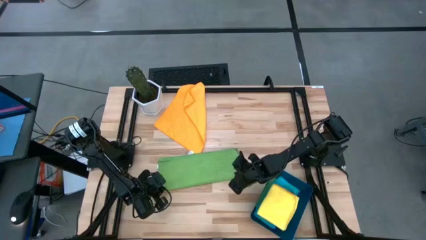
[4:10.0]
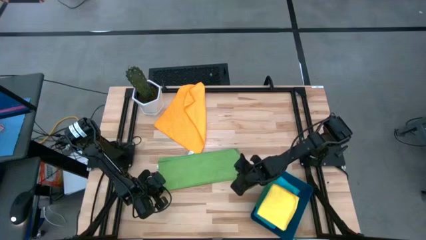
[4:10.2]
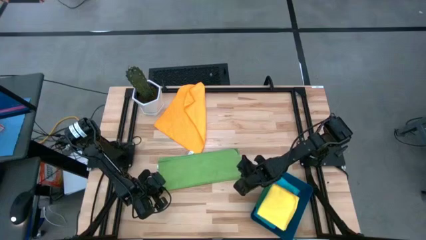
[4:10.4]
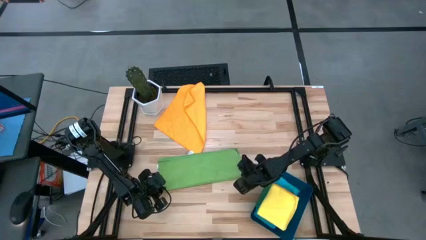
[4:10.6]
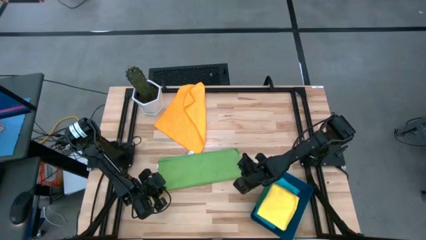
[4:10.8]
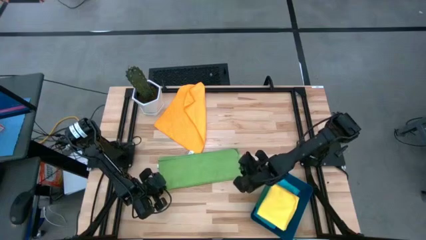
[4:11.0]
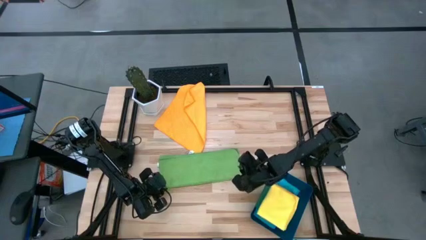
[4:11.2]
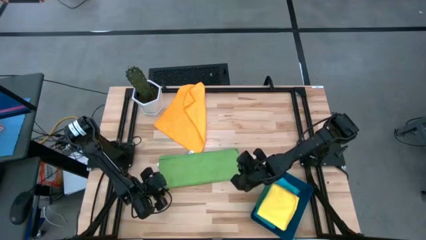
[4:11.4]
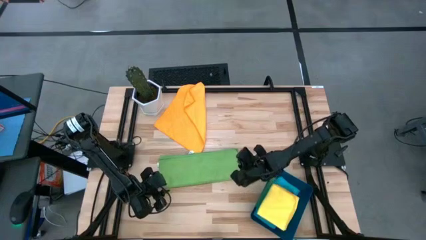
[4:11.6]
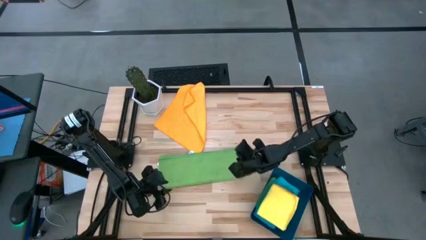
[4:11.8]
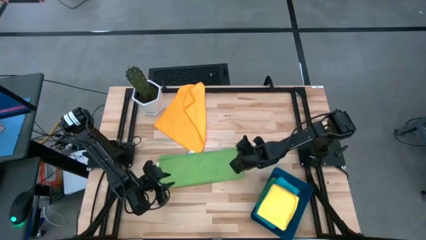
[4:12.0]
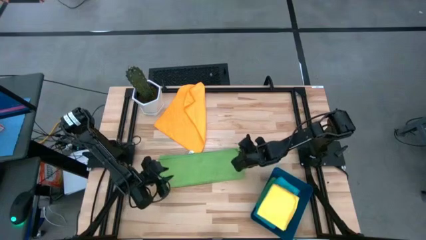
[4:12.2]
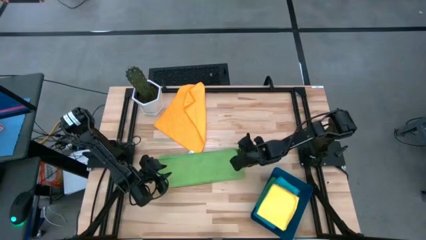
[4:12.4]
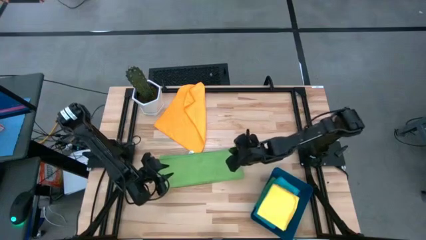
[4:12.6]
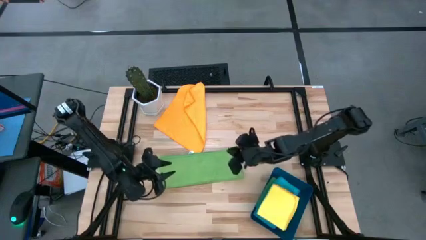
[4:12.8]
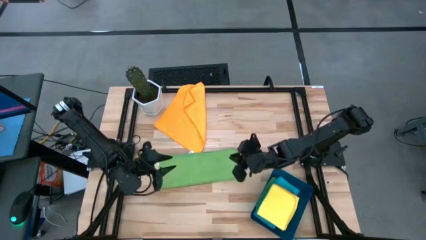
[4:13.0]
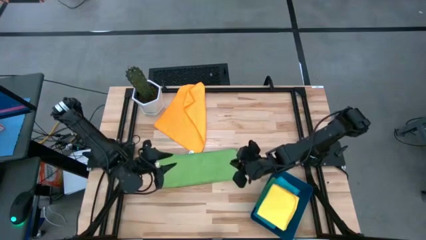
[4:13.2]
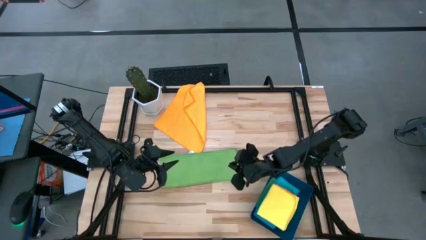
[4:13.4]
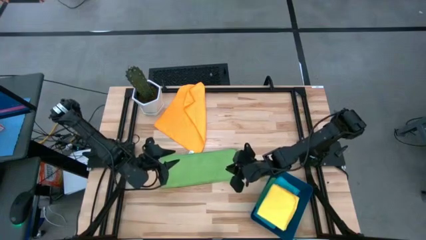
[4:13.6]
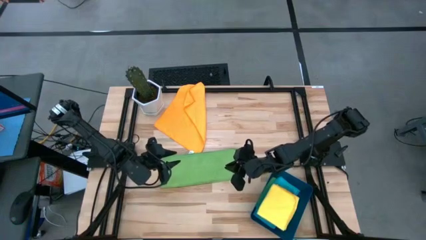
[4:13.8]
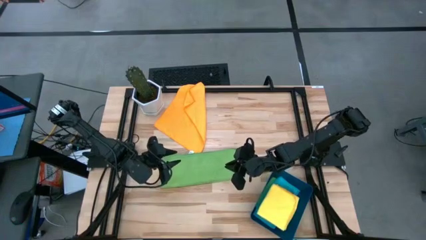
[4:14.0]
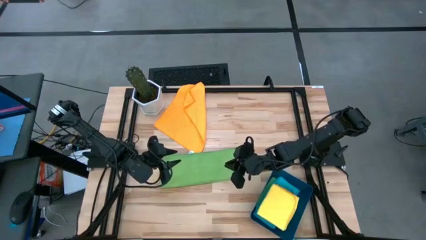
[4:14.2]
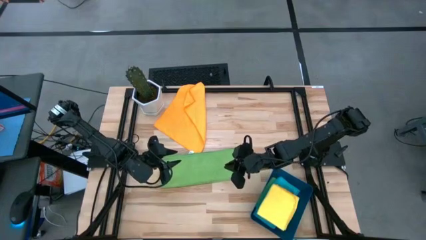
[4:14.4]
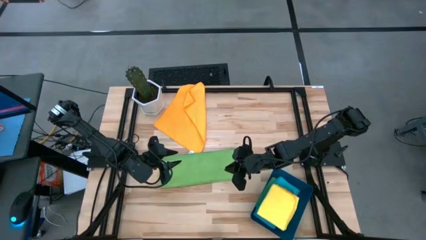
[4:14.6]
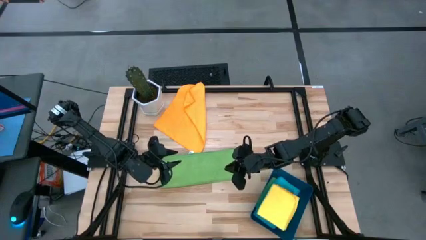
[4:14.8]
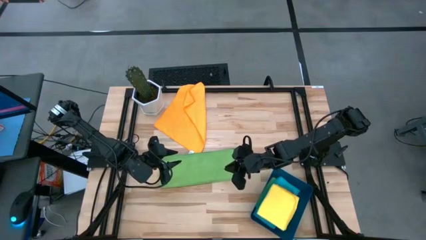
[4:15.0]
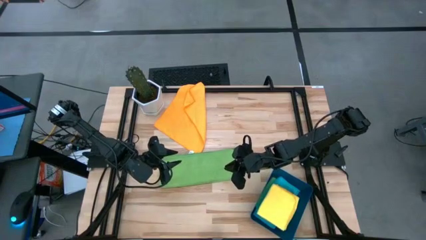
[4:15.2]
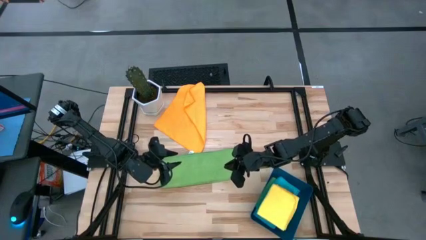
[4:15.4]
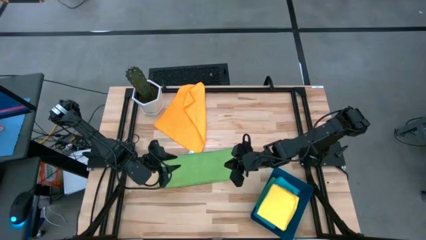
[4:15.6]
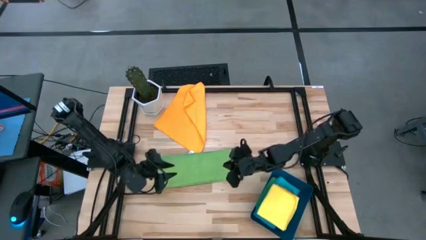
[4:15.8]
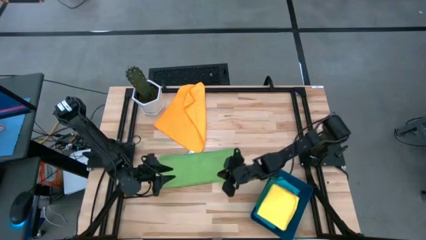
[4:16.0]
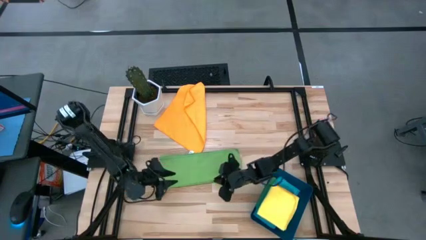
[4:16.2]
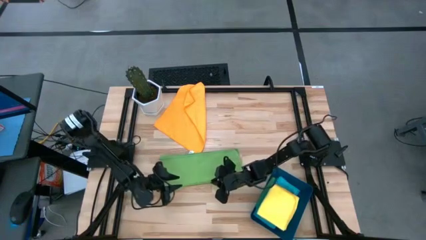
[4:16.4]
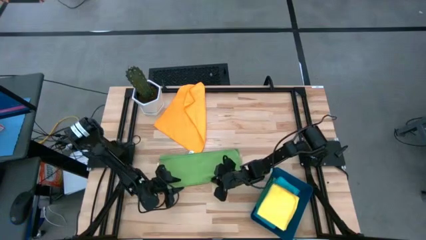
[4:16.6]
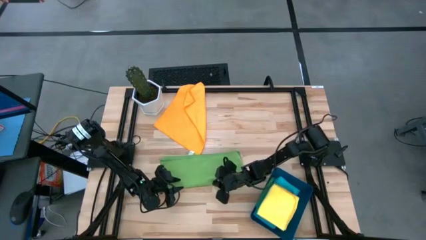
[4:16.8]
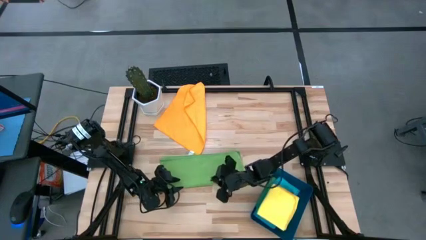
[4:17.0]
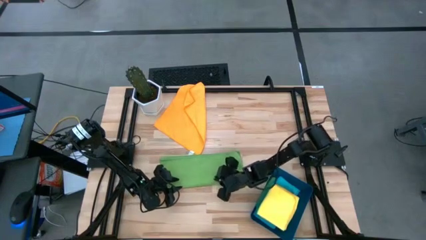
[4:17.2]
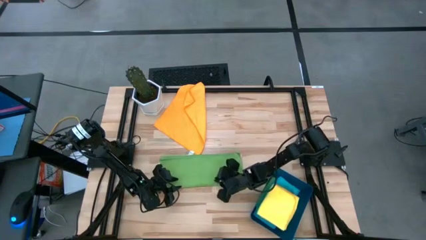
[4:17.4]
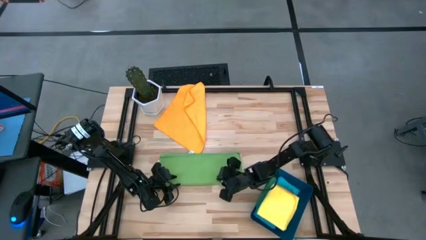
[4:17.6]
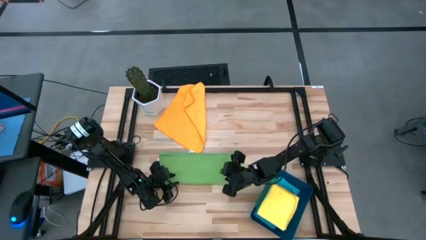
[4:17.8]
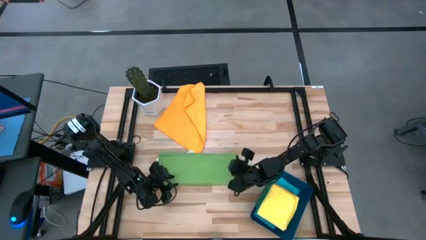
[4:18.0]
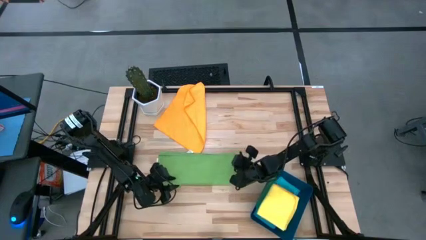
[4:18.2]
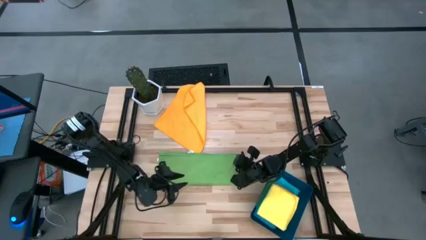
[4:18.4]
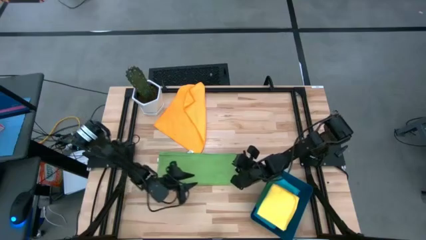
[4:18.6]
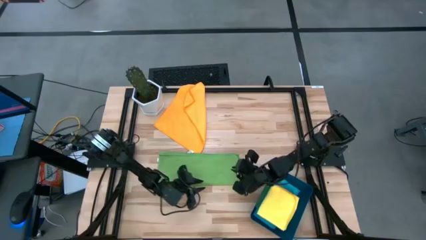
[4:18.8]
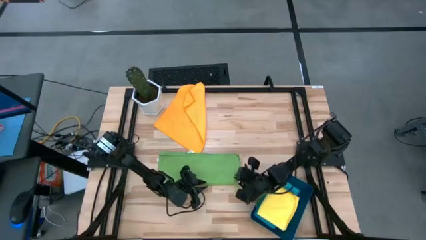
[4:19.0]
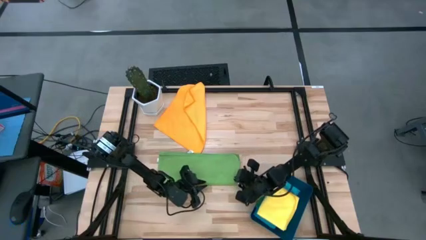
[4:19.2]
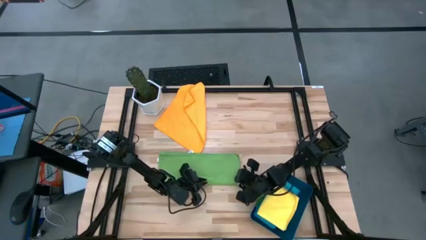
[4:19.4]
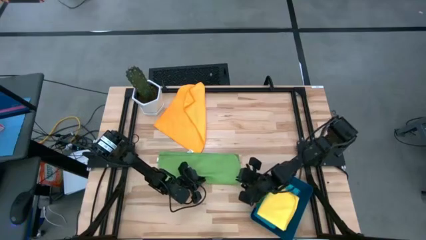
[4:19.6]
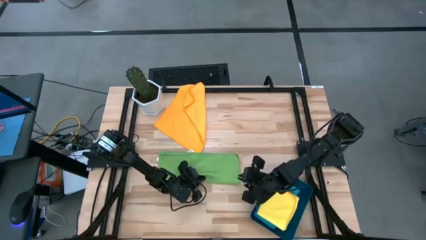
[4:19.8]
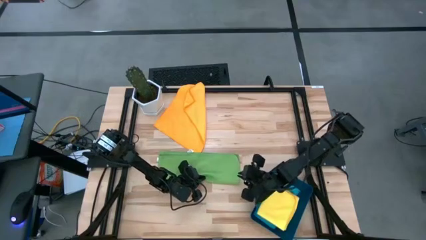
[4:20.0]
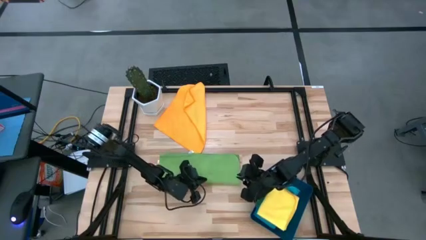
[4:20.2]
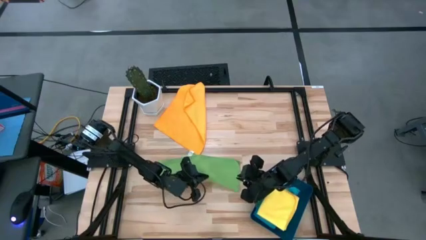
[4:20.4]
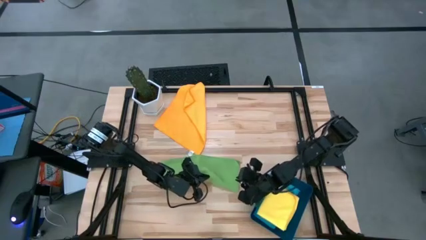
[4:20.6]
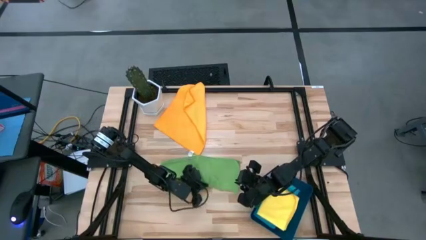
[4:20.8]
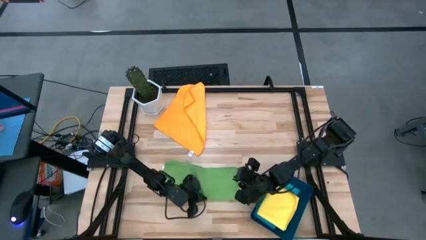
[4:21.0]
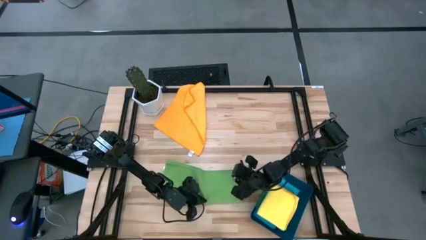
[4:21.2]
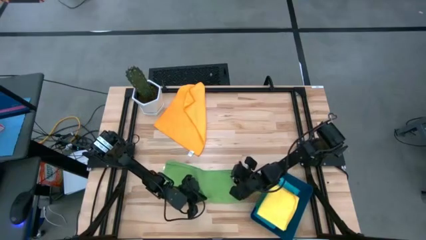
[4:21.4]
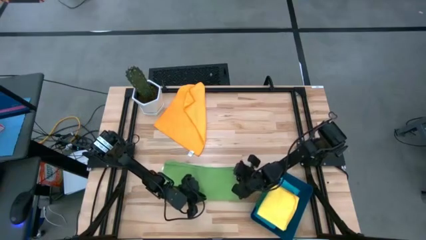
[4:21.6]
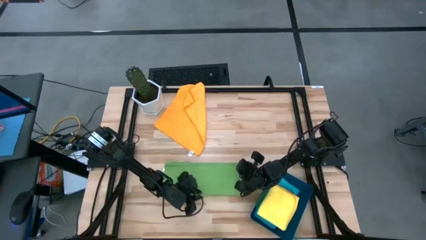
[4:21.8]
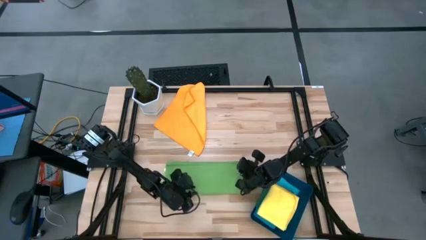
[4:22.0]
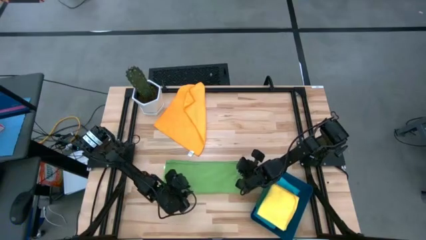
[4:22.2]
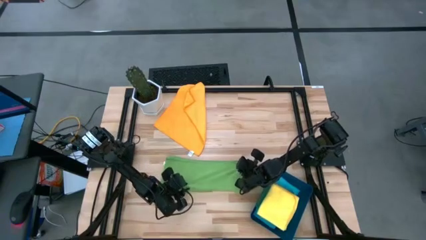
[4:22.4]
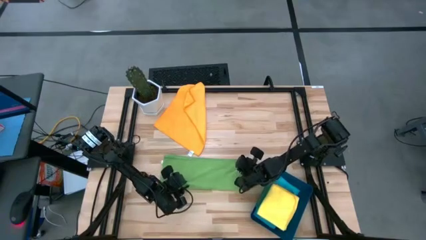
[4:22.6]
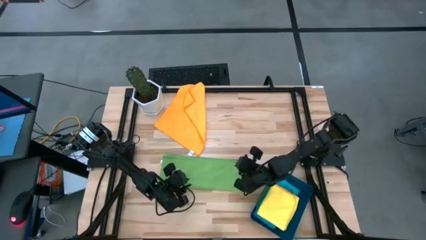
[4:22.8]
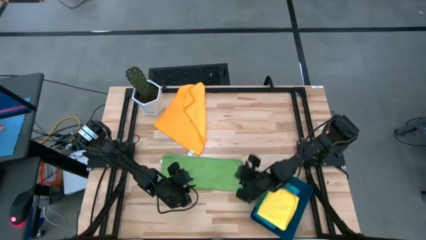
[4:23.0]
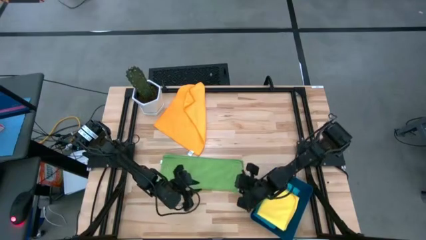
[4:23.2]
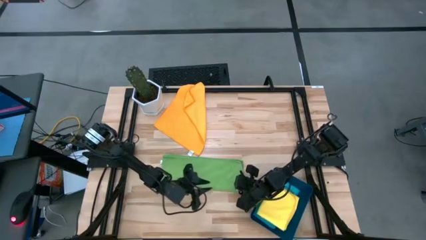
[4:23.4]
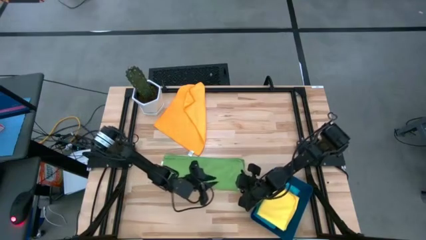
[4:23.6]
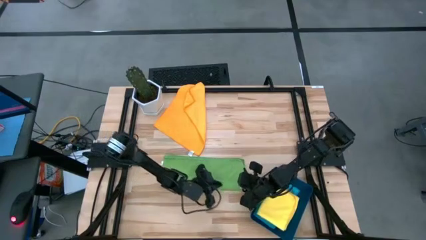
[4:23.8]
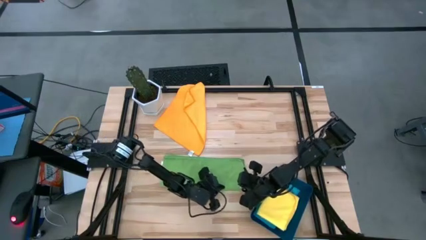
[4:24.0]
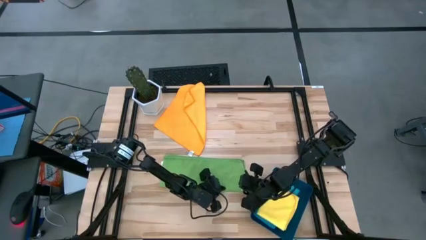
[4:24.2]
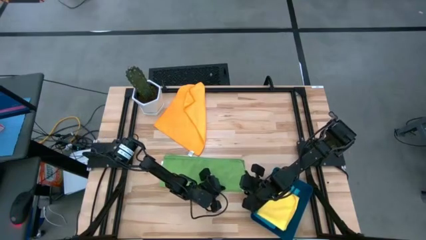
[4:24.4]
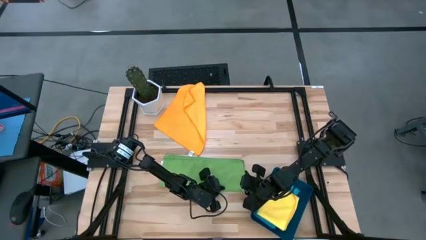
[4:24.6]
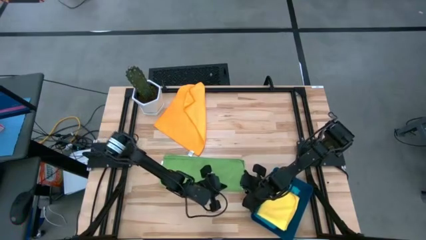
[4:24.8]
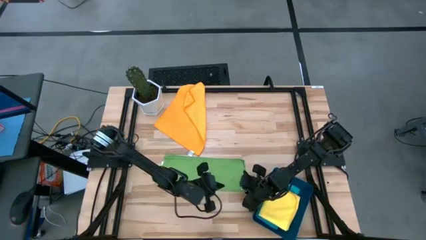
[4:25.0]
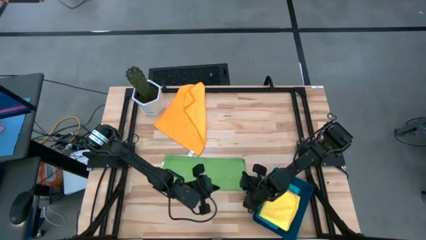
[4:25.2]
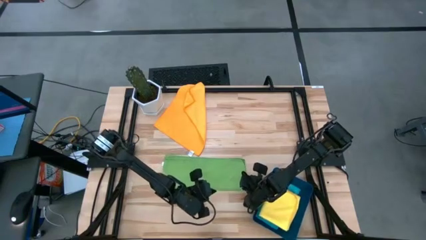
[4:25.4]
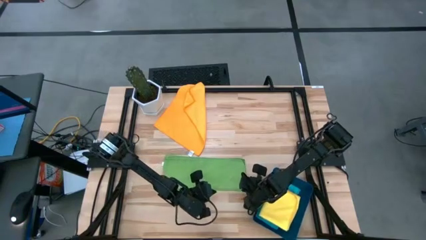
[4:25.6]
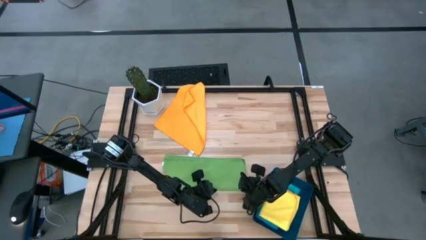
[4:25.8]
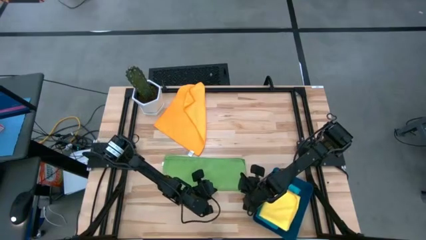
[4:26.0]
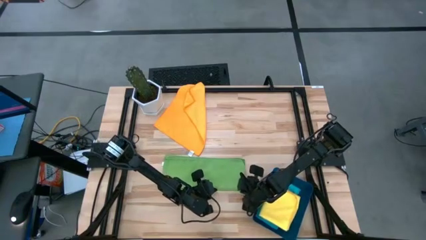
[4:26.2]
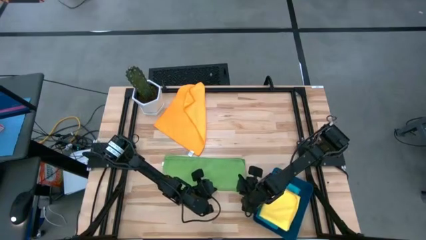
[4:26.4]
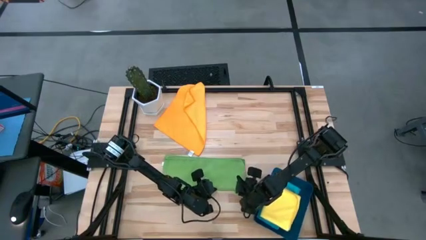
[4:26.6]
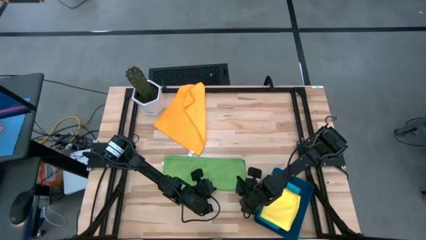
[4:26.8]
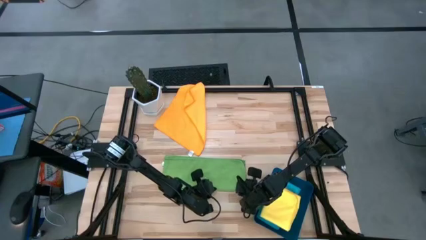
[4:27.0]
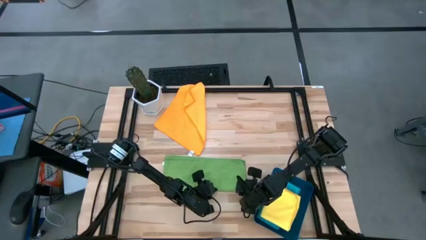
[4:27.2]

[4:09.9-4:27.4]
Task: Fold microfiber towels
Fold the green microfiber towel
